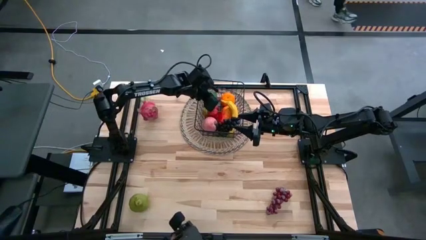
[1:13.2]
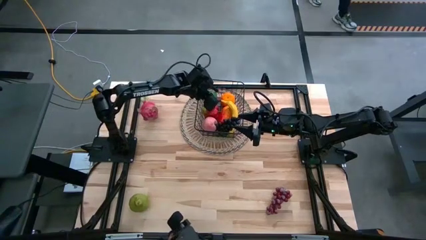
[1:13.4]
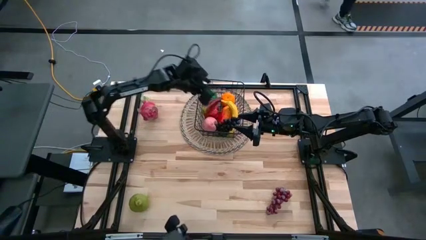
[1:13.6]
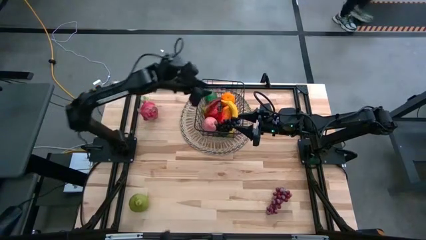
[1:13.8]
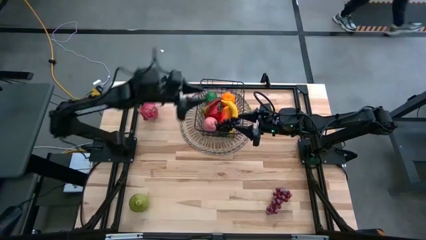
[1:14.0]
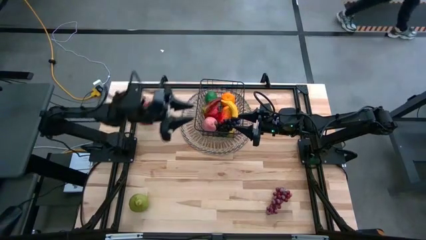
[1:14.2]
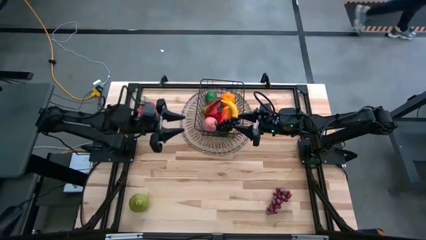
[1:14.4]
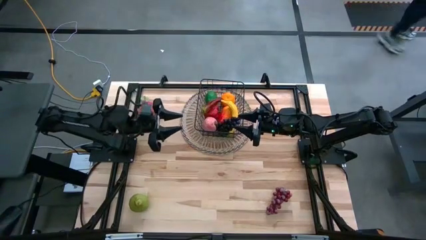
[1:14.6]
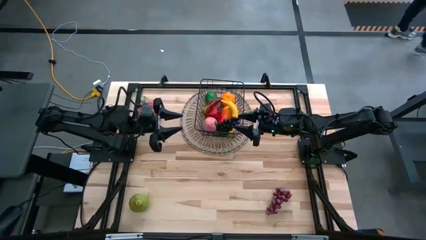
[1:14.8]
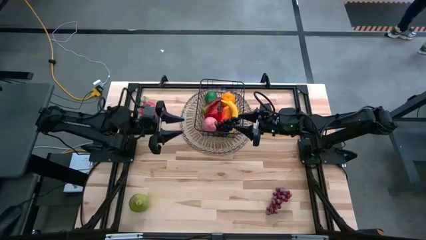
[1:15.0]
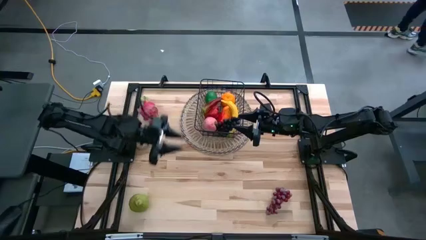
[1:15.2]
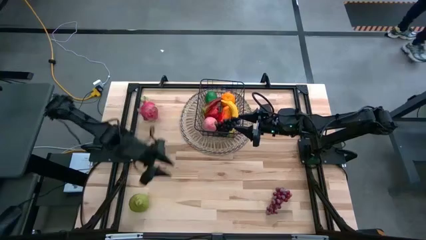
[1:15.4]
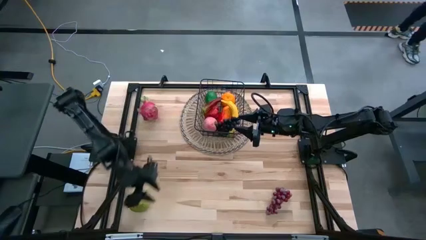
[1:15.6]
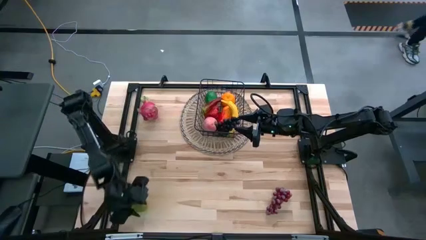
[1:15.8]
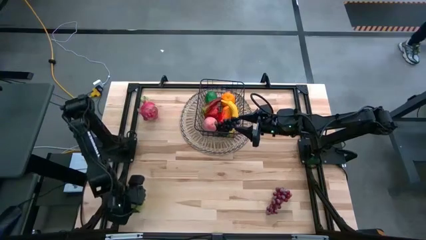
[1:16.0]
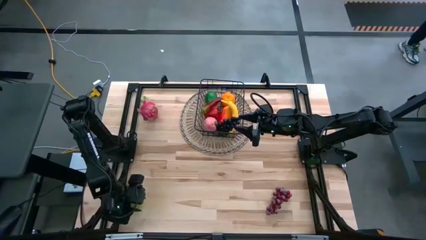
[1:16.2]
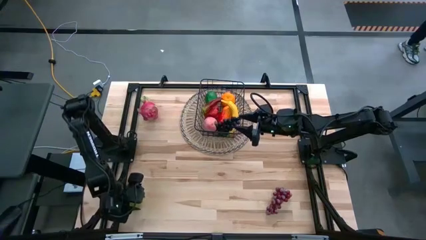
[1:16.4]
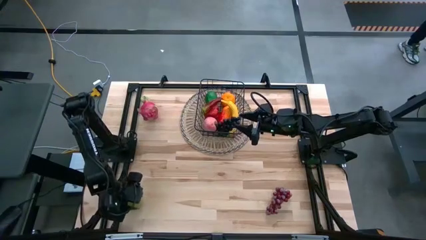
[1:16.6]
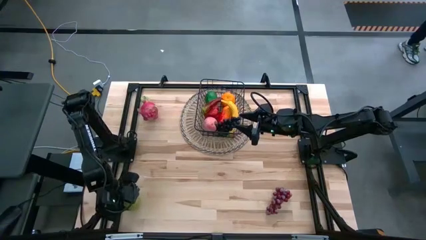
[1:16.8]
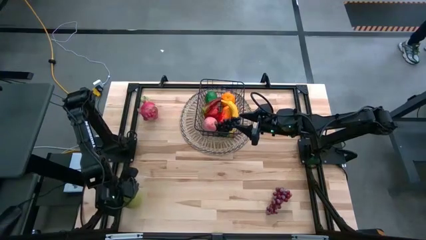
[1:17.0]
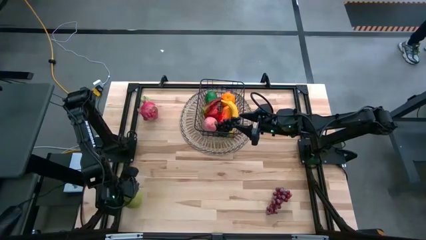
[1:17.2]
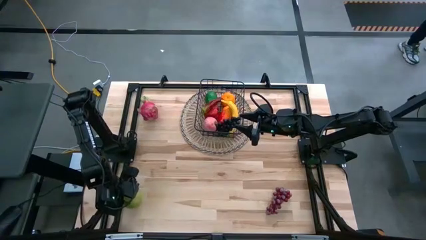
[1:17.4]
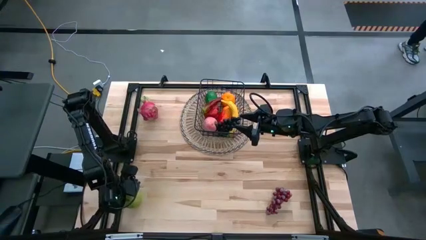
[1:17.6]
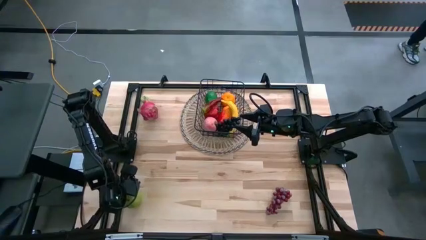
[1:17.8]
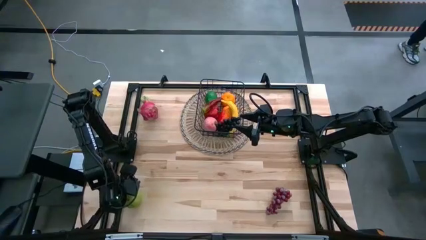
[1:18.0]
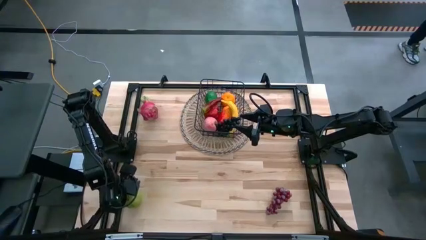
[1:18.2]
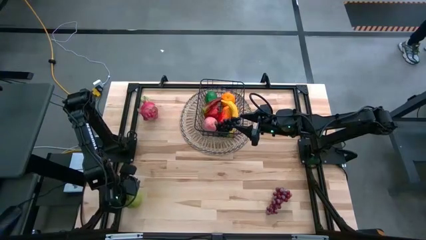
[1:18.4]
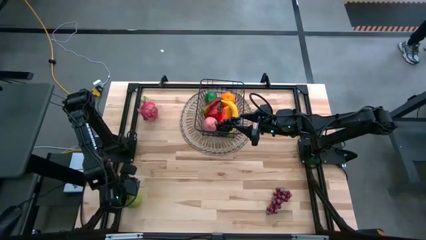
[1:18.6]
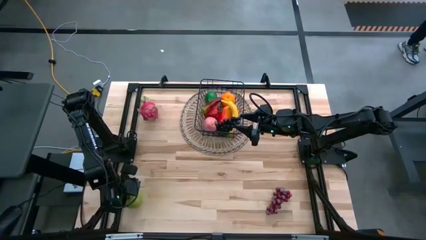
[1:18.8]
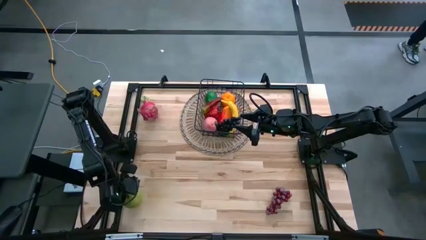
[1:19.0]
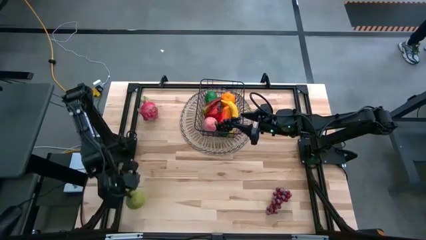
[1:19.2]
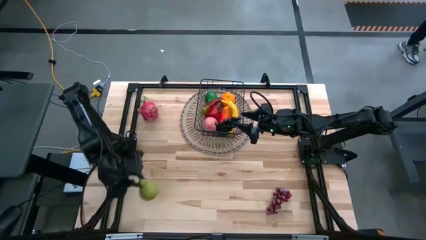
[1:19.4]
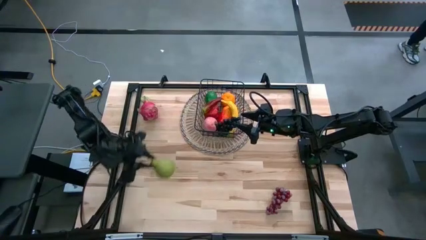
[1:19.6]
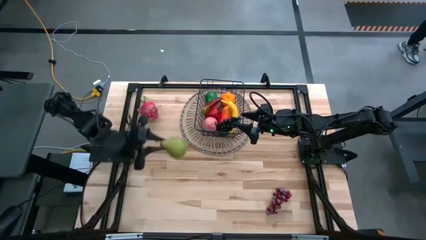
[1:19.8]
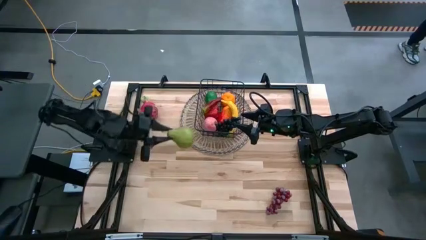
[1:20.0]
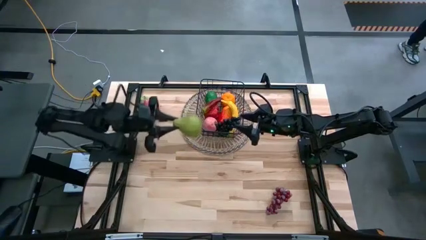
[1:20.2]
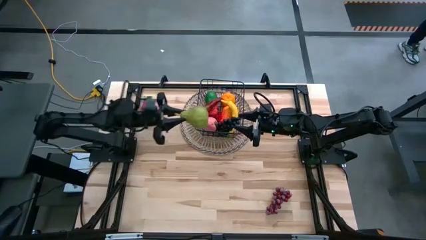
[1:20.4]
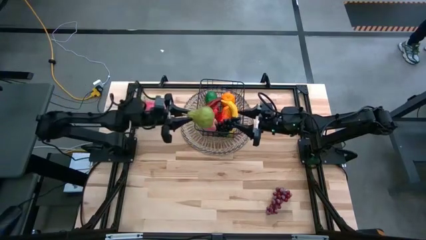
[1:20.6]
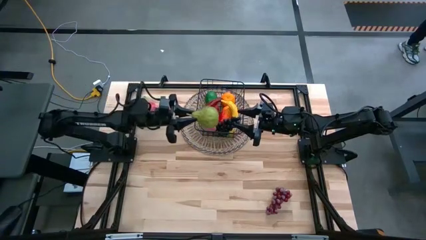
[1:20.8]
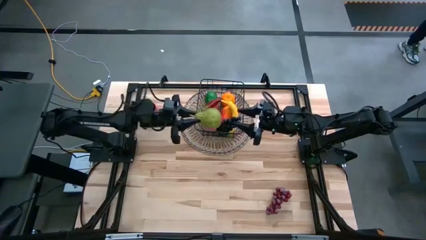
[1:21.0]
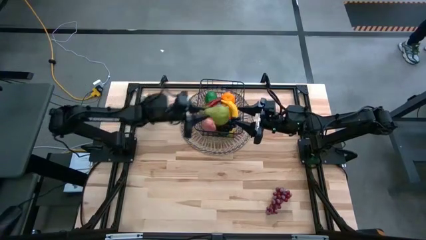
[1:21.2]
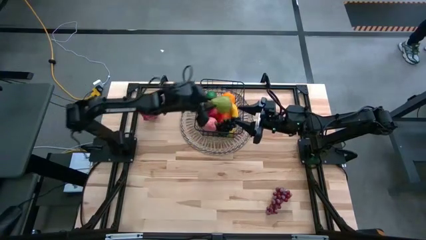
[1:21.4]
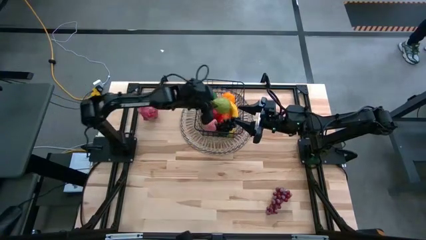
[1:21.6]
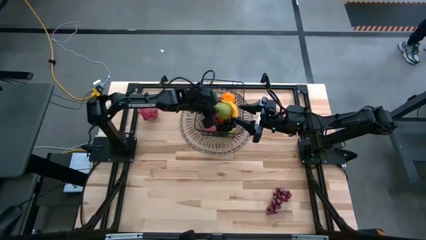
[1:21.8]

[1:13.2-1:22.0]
Task: Build produce basket
Put the green pear into the black wire basket

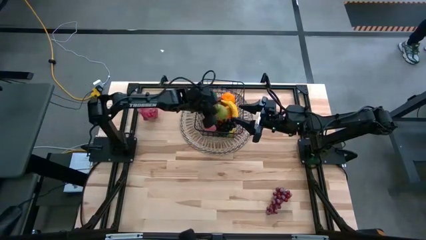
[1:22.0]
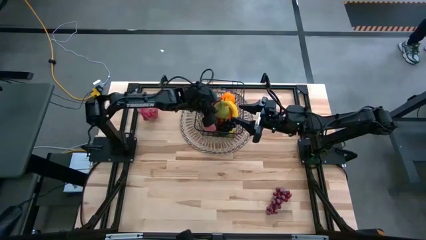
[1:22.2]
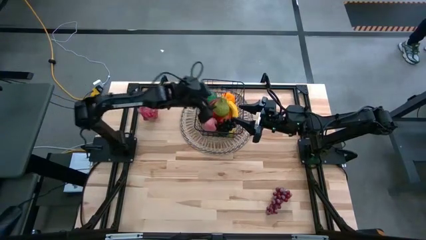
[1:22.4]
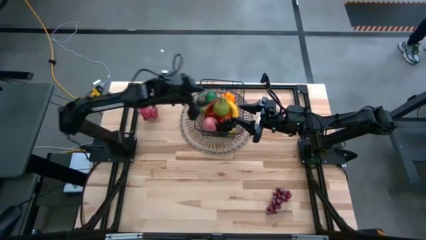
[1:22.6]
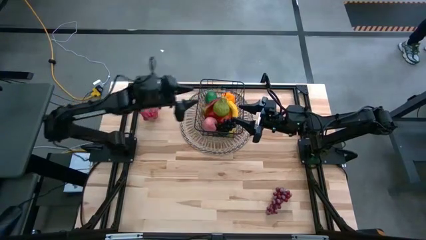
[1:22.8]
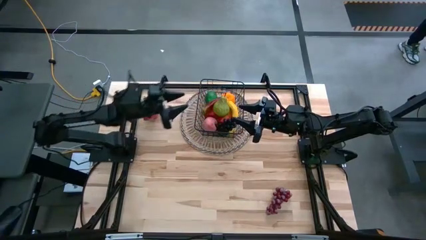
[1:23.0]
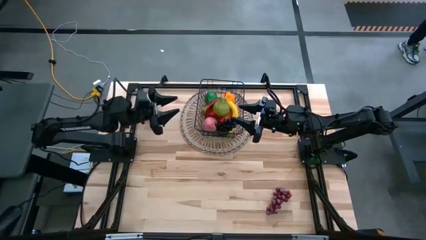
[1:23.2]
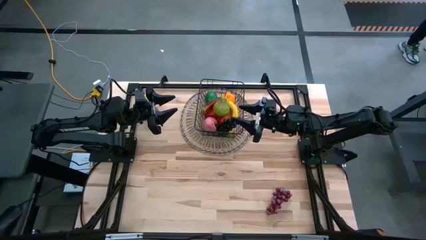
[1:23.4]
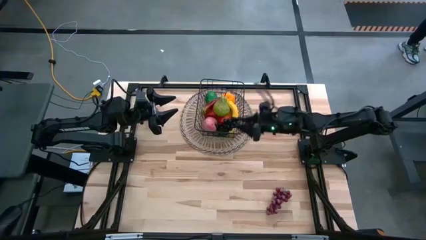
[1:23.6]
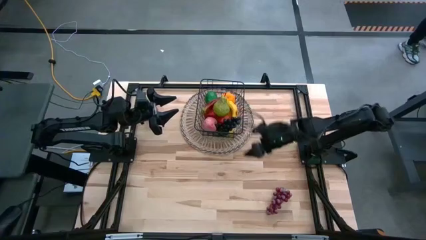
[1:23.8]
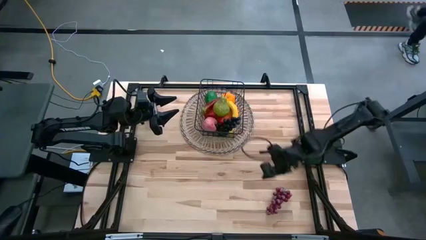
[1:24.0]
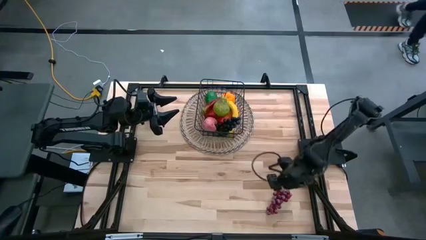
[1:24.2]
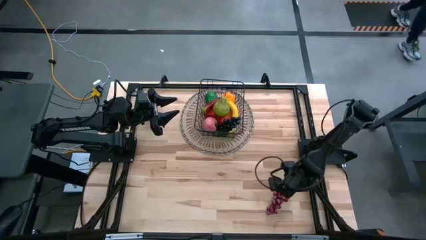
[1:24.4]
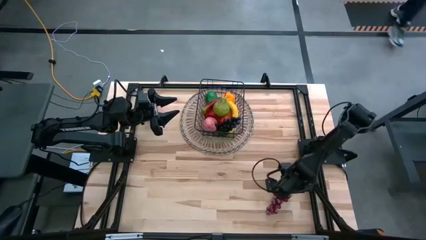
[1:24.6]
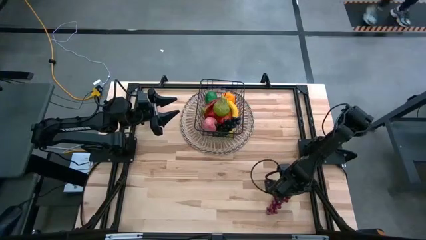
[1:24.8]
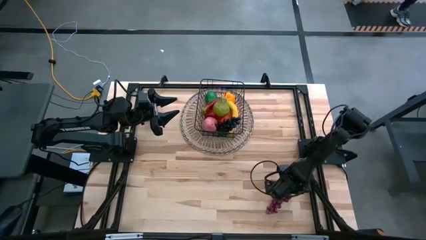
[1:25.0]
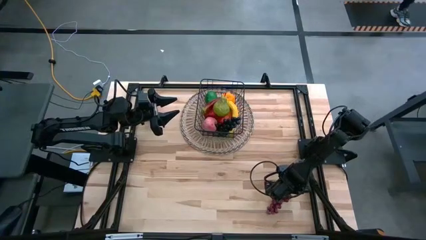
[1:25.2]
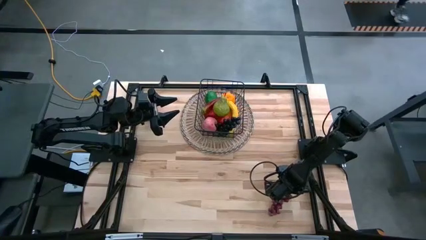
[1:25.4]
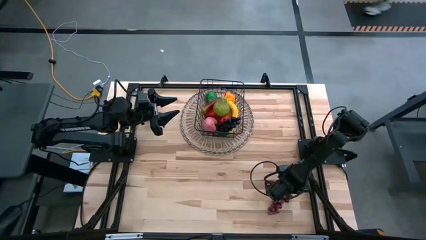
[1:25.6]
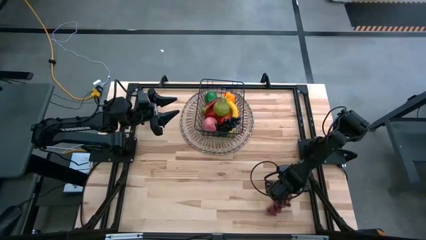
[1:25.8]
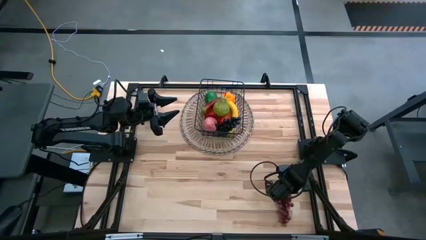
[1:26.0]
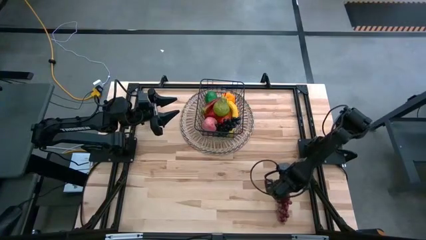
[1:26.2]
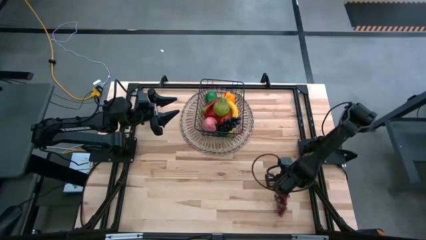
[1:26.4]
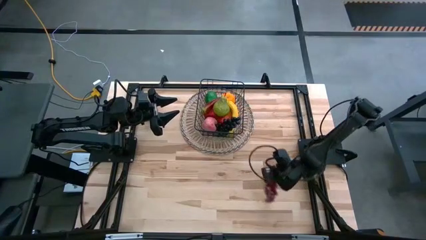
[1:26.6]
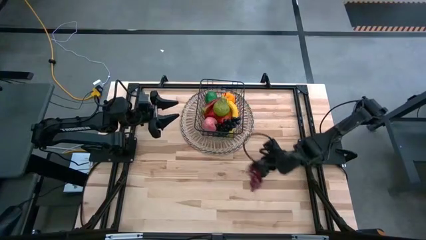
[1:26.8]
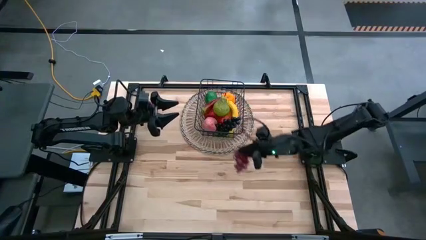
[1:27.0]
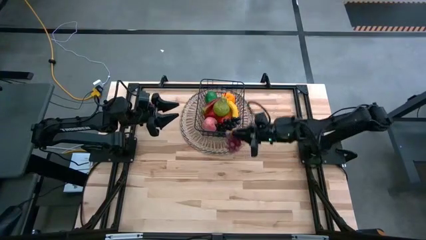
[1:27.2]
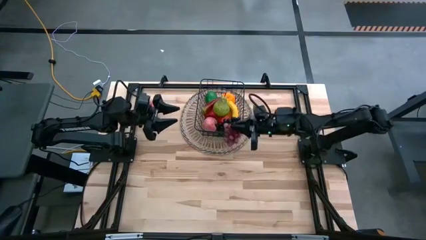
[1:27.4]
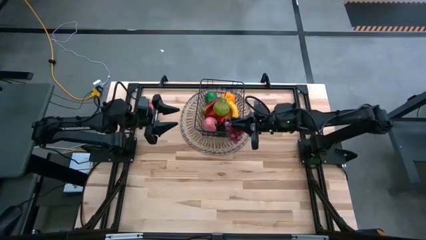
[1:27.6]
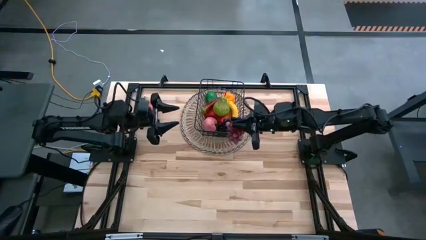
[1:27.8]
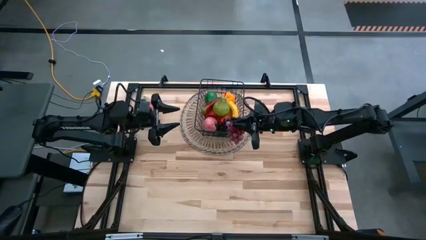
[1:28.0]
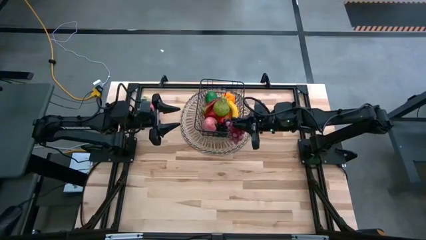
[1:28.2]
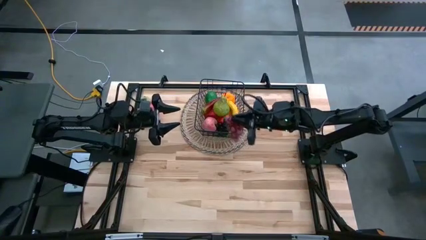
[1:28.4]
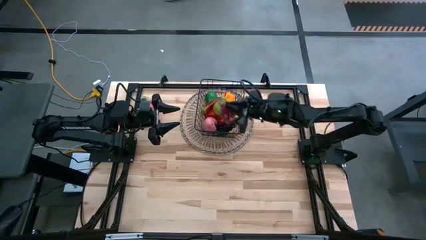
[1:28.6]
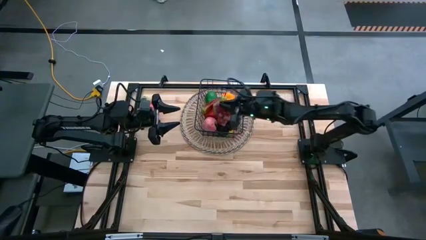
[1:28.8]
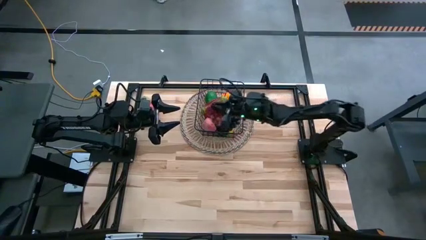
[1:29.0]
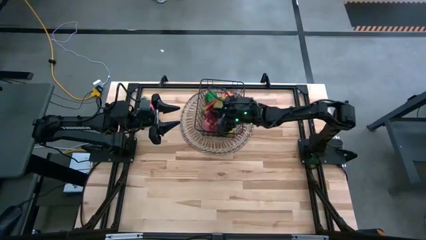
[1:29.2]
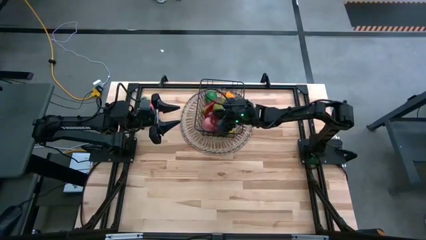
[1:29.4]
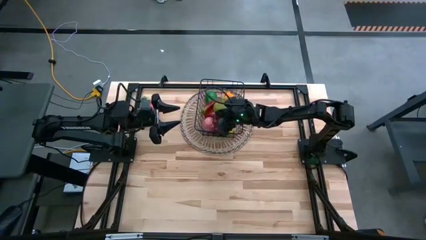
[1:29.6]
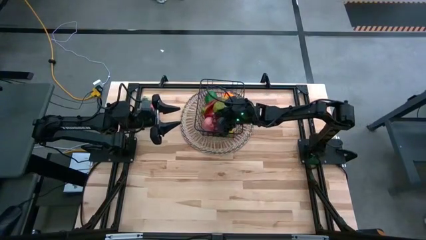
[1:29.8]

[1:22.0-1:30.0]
Put the red grapes into the black wire basket
